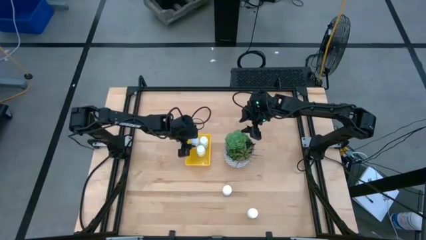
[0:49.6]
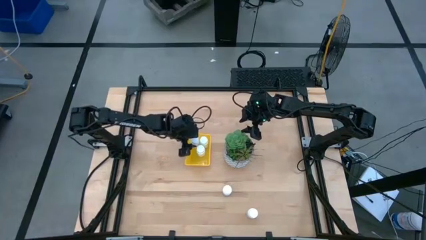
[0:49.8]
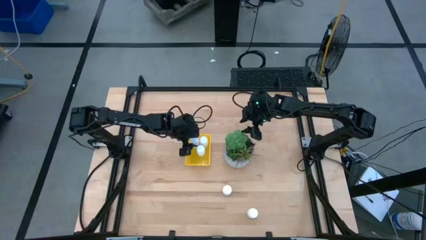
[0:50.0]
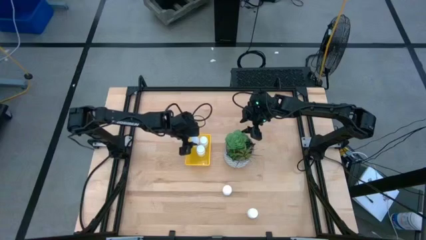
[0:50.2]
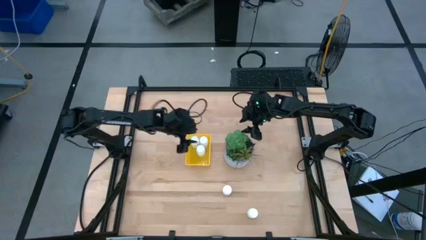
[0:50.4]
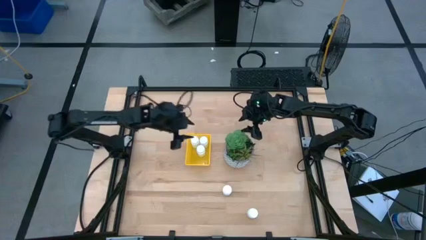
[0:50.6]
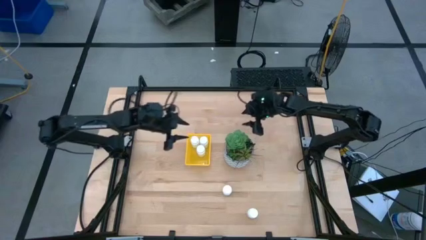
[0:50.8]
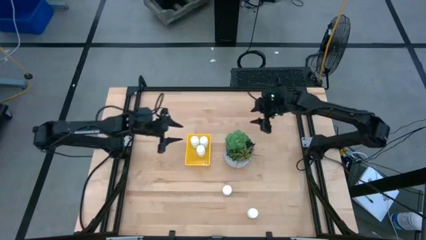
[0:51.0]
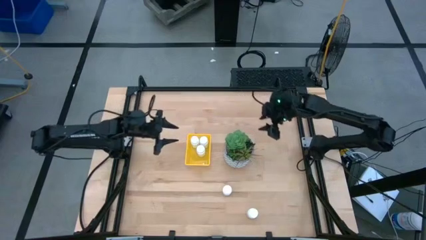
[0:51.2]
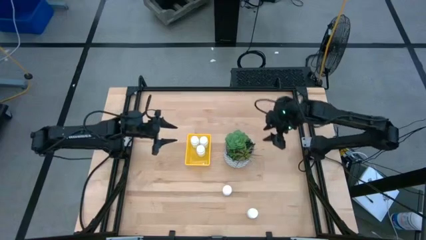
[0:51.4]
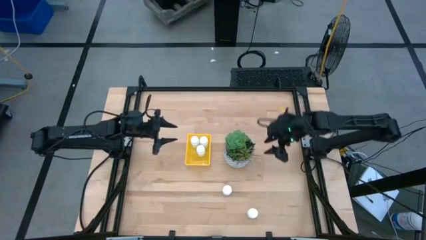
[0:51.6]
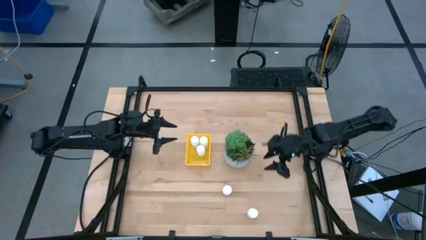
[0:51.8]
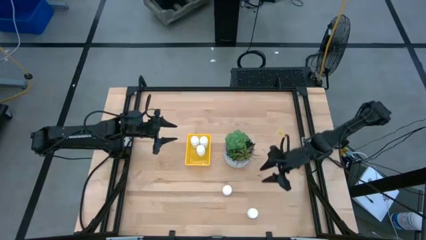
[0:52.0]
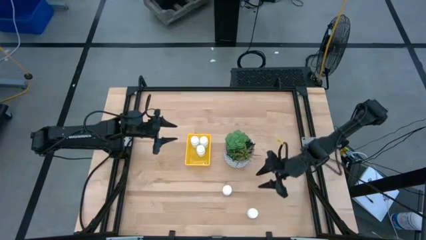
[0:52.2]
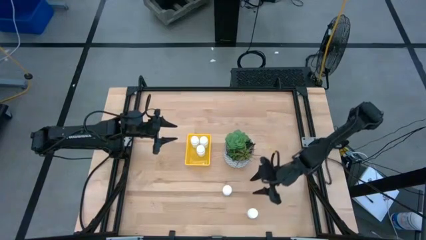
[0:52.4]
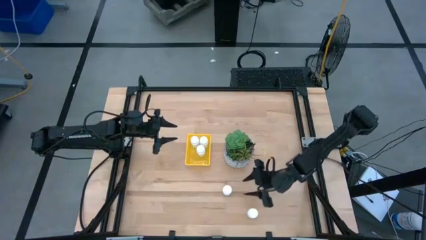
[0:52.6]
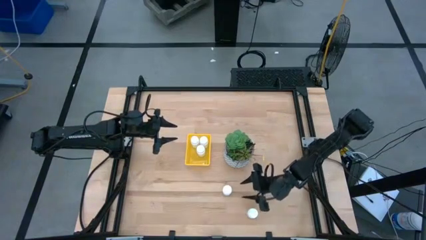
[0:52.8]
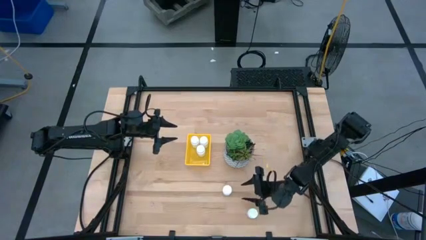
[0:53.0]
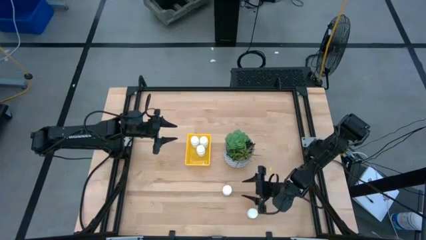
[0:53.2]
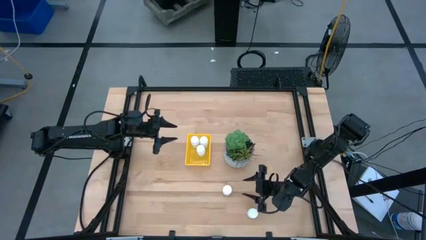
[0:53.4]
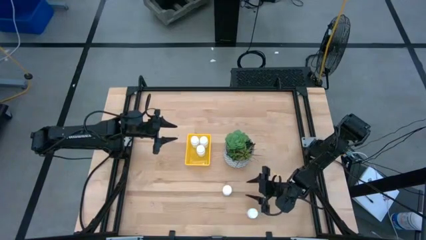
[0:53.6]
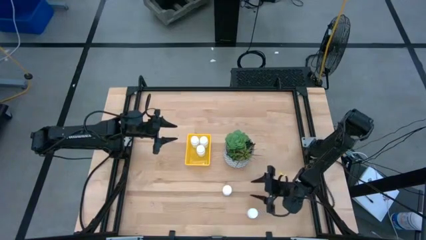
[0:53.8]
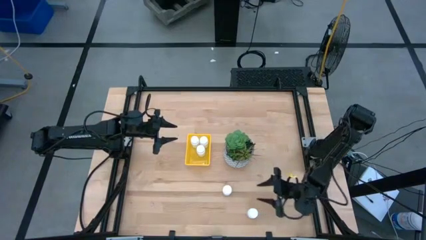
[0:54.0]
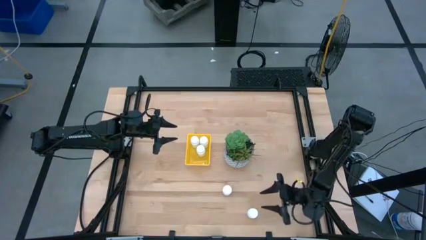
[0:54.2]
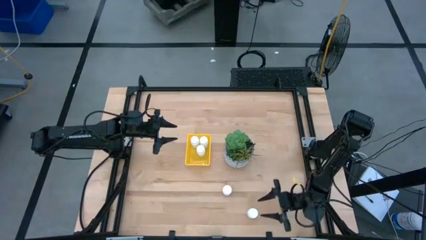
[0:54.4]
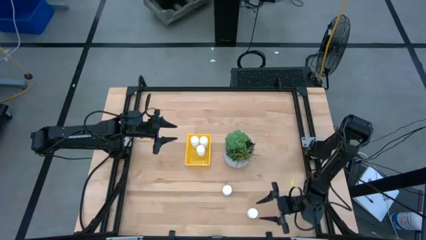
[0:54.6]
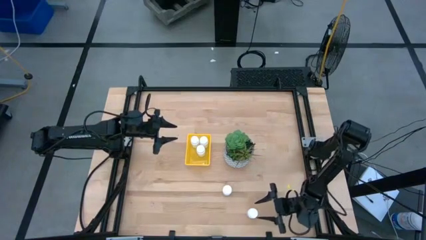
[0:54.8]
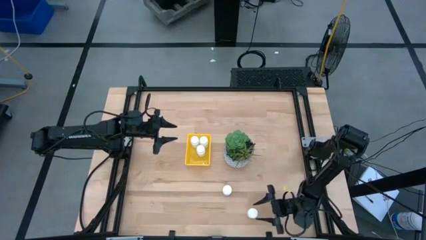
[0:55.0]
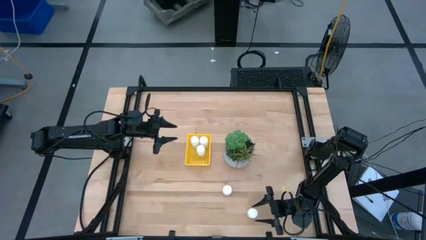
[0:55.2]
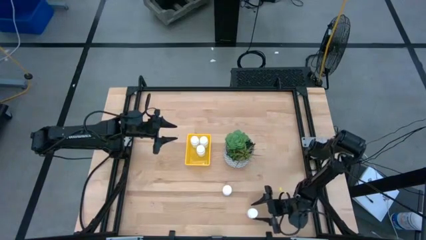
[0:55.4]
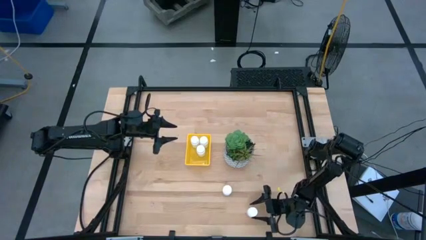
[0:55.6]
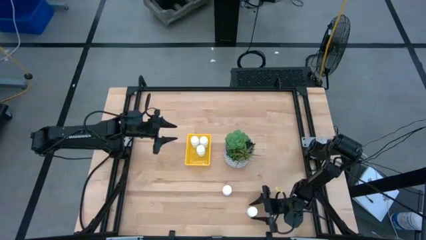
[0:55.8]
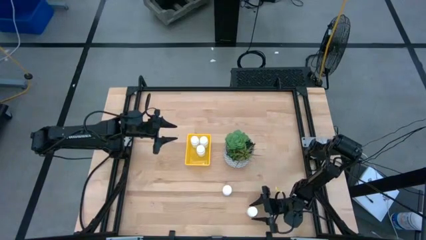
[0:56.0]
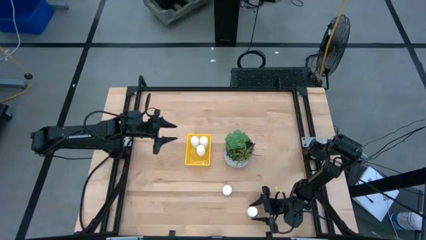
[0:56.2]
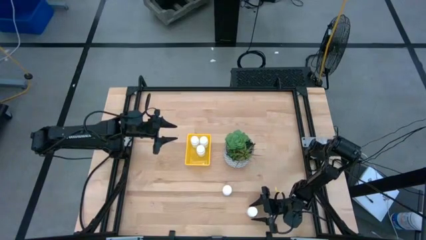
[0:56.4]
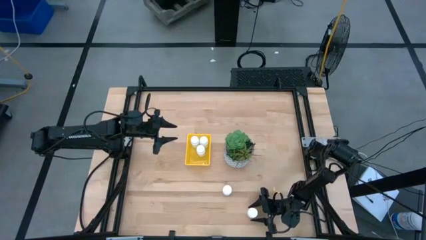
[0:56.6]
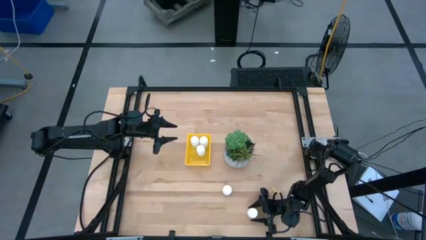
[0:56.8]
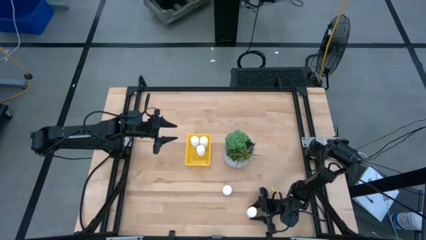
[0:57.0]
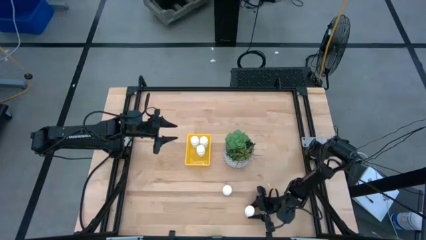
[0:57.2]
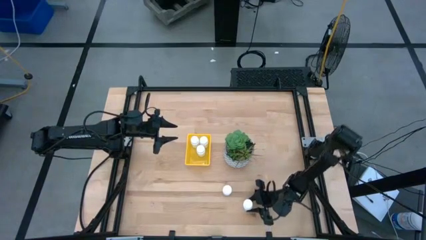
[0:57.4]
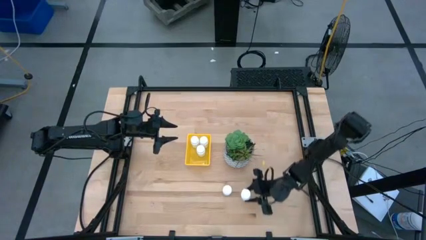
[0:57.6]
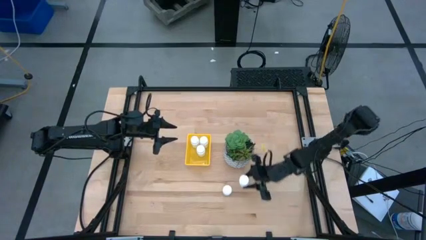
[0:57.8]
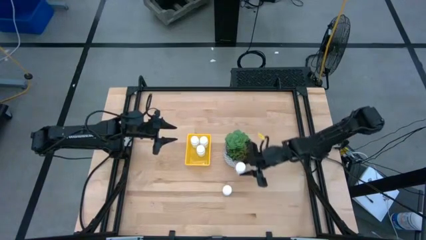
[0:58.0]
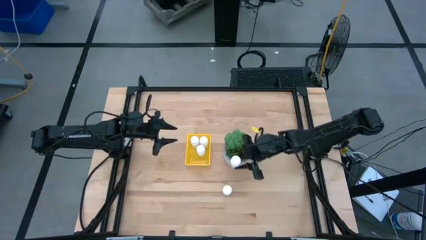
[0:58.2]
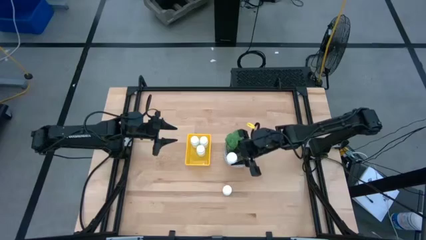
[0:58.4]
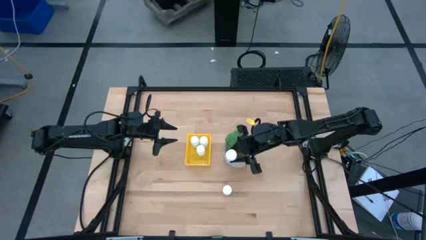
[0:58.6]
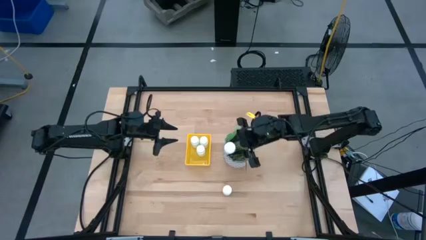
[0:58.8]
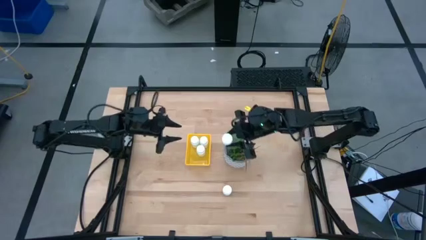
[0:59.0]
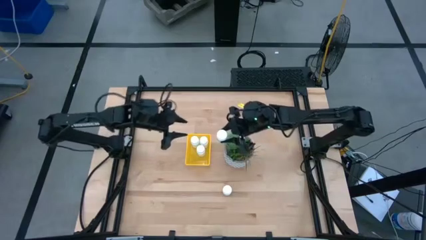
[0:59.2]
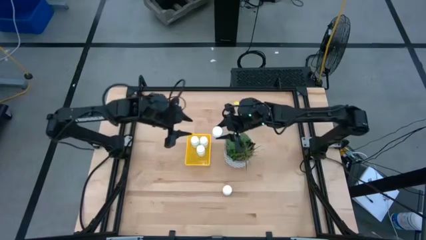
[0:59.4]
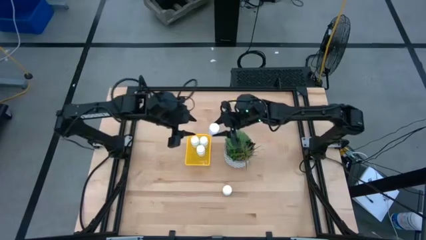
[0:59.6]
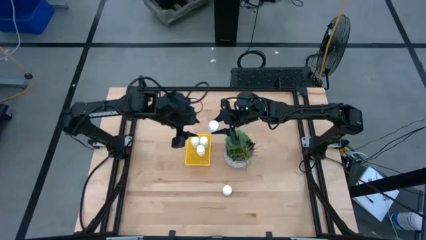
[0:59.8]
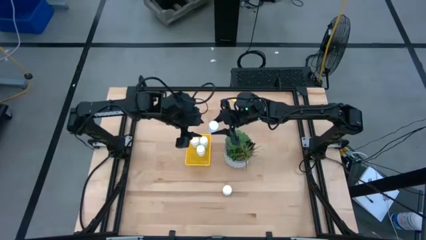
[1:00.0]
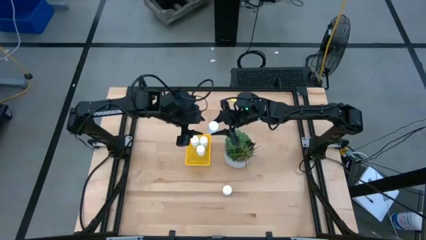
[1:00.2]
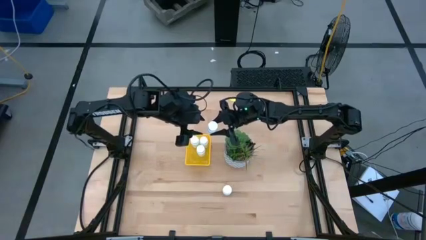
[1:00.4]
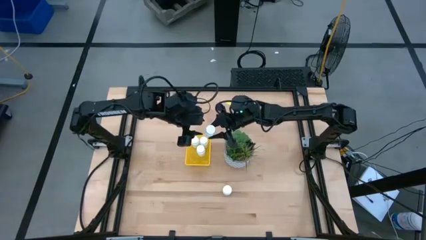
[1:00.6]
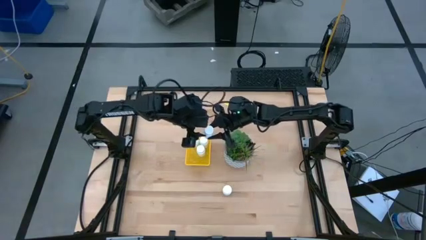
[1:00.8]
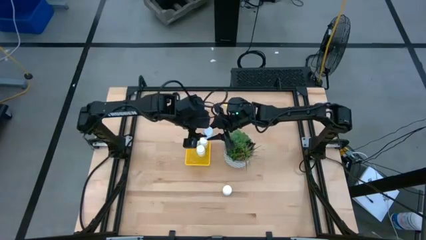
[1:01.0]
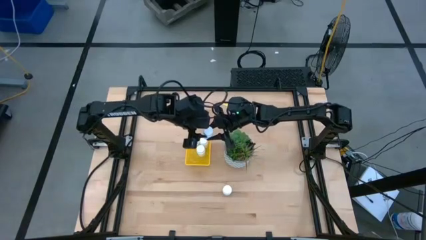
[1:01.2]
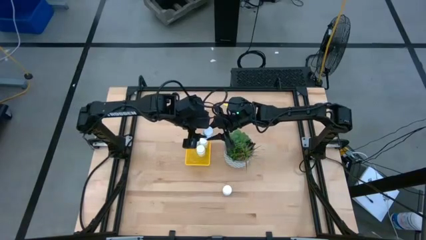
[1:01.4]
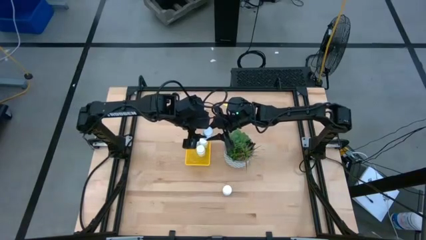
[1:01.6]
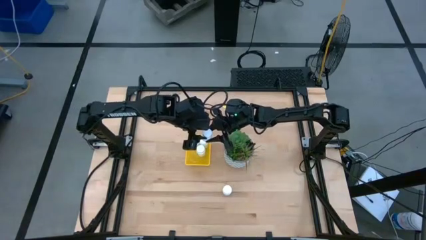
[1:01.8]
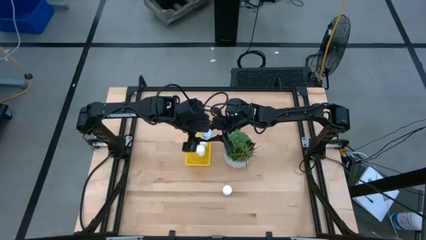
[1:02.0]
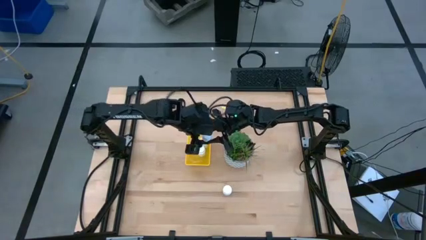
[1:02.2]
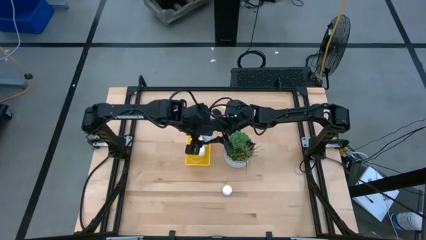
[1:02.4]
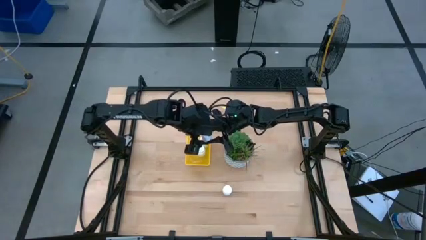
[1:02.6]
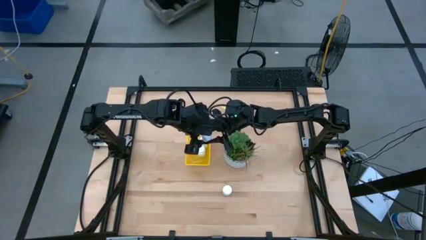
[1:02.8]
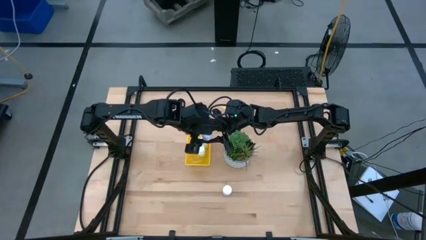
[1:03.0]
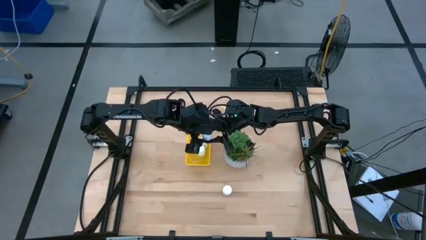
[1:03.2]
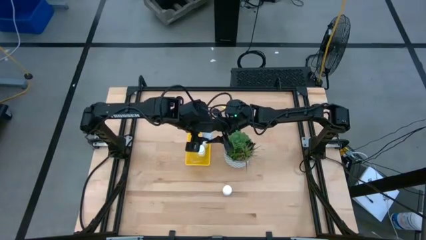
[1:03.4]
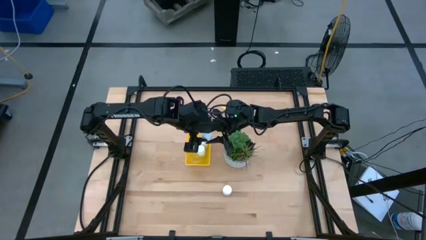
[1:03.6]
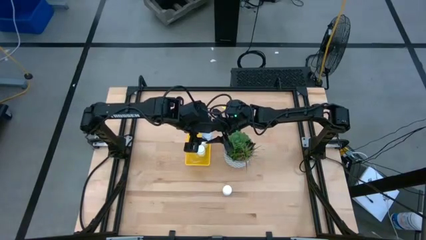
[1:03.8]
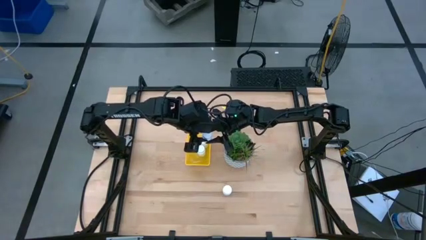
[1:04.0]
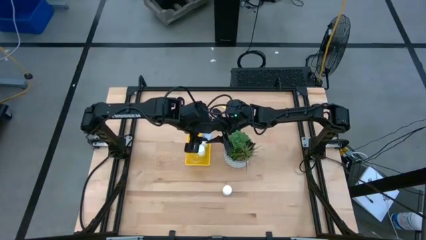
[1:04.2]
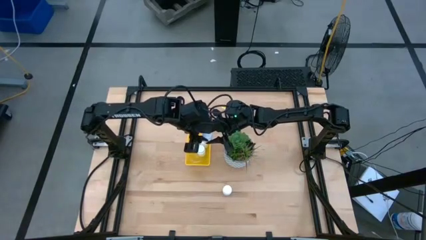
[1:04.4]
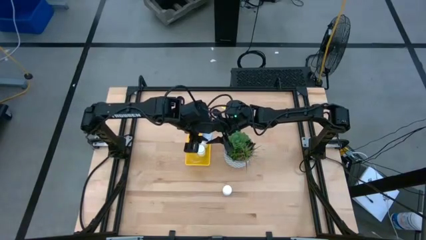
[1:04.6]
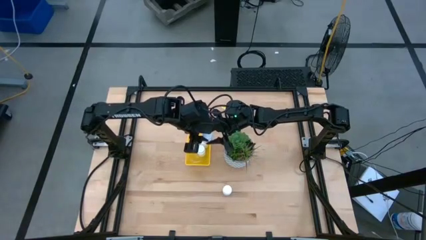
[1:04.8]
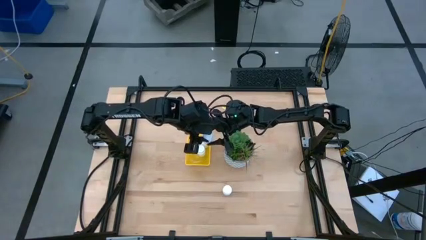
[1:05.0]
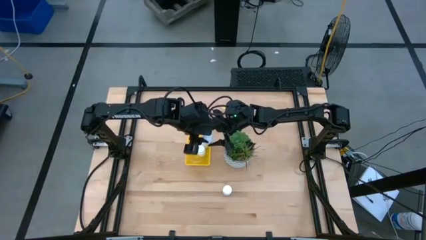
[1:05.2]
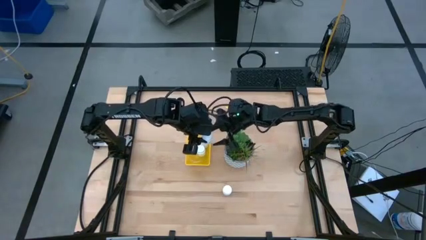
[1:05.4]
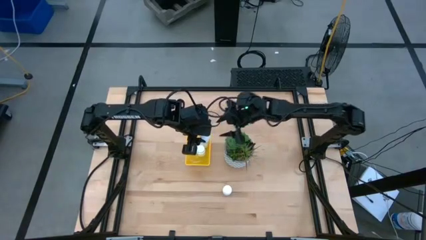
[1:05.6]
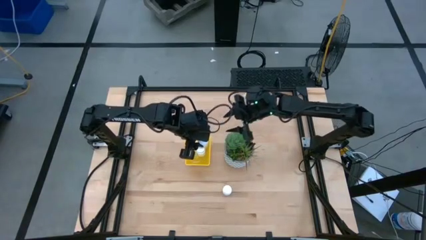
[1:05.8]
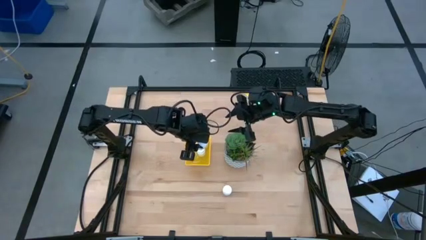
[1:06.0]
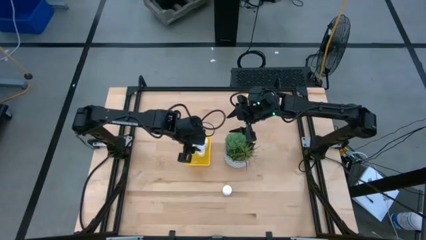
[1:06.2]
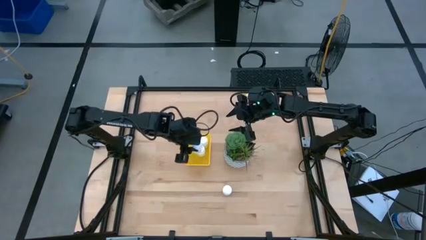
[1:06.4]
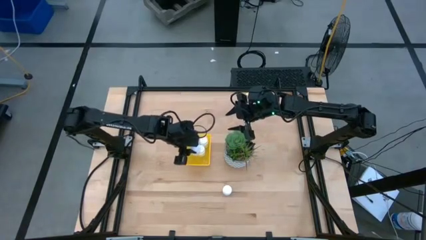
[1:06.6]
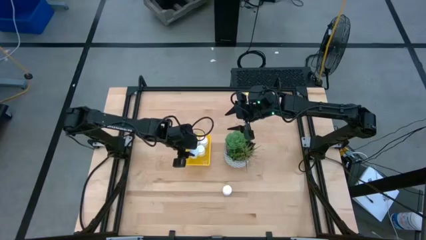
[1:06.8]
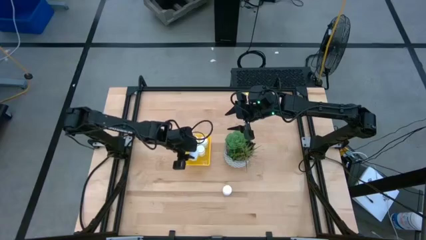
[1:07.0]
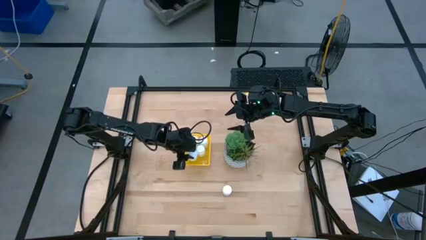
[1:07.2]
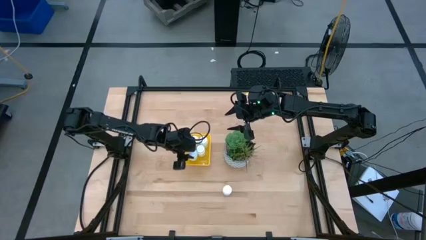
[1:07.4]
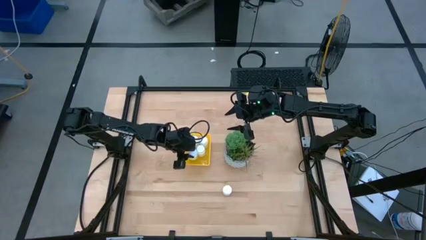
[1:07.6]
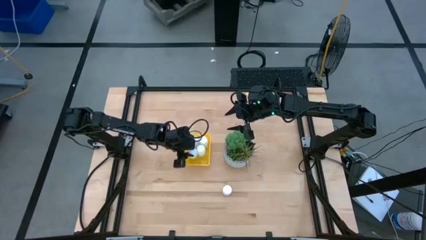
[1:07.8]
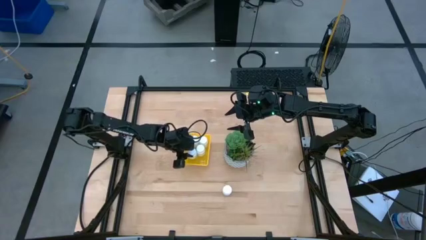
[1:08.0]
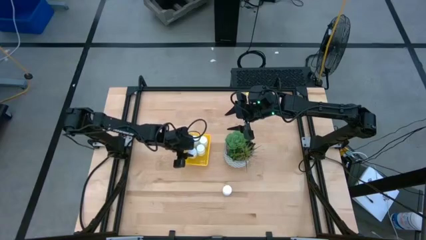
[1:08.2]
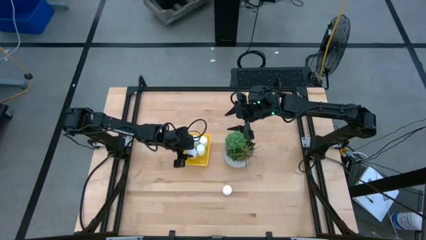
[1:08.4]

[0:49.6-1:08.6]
Task: Pick and place pill bottles into a basket
Put the white medicine bottle into the yellow basket
